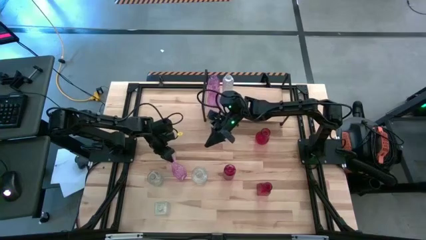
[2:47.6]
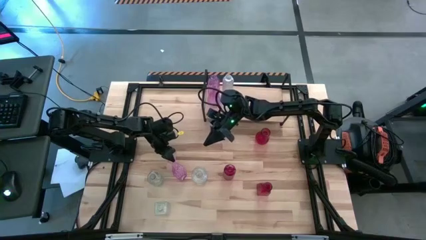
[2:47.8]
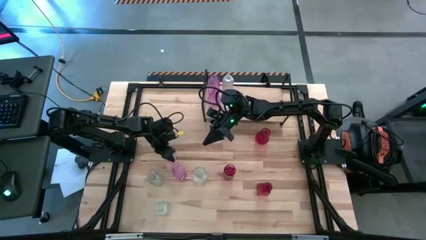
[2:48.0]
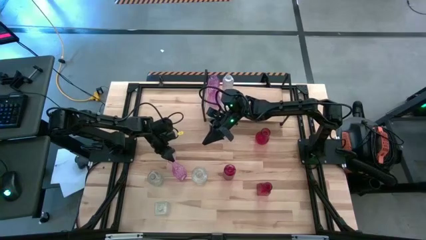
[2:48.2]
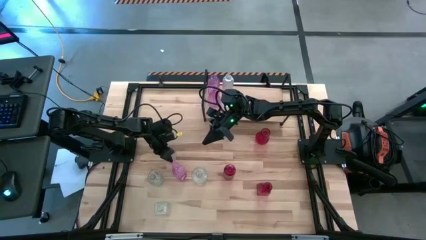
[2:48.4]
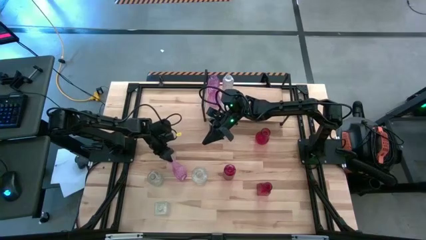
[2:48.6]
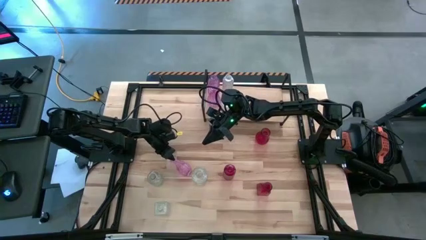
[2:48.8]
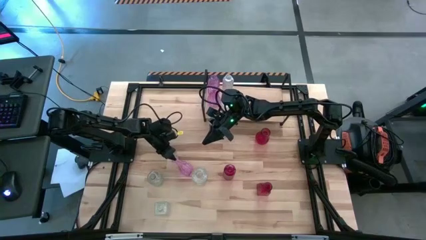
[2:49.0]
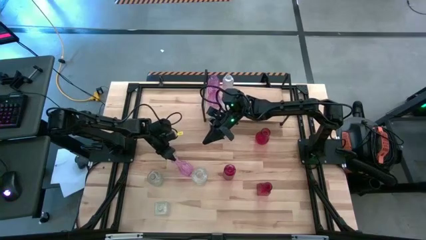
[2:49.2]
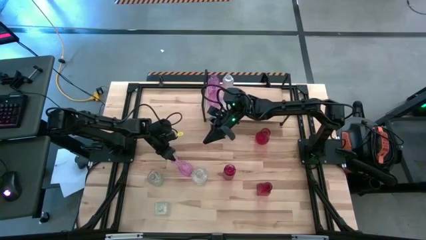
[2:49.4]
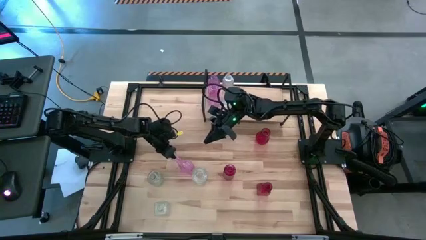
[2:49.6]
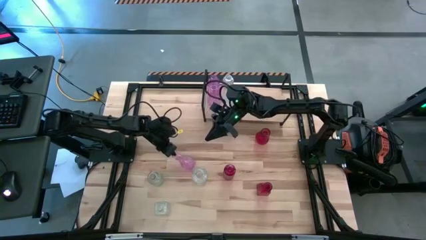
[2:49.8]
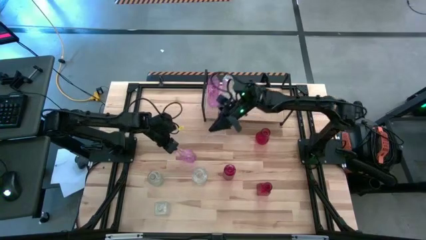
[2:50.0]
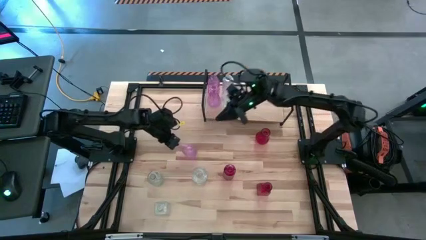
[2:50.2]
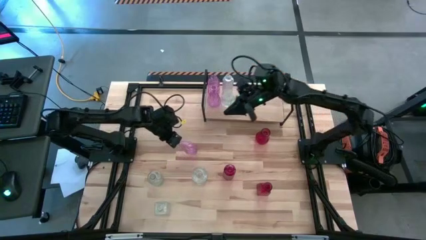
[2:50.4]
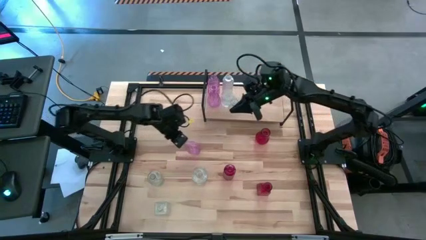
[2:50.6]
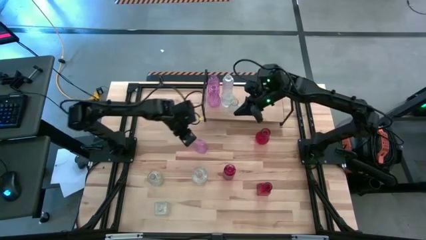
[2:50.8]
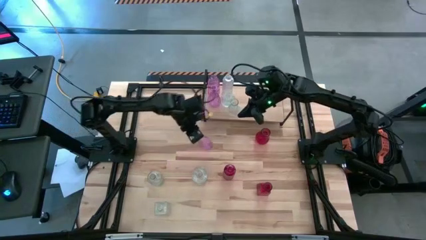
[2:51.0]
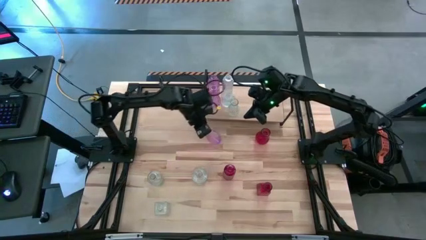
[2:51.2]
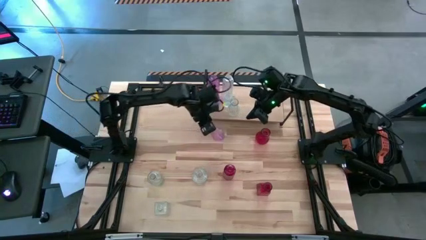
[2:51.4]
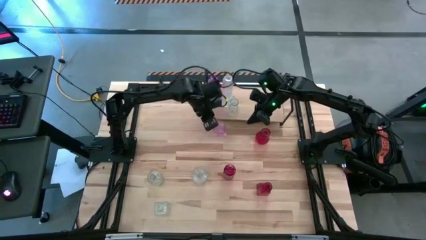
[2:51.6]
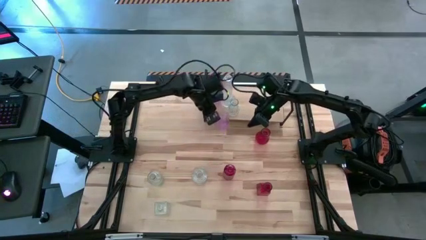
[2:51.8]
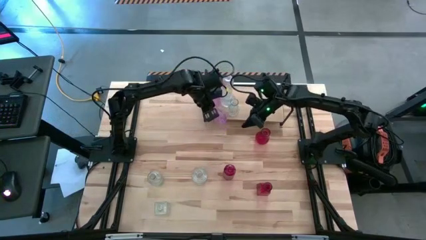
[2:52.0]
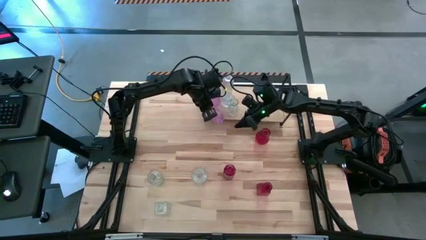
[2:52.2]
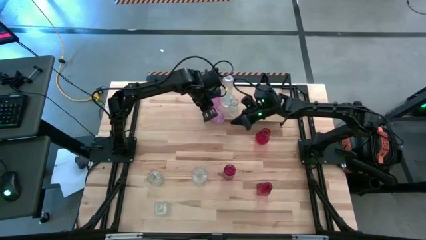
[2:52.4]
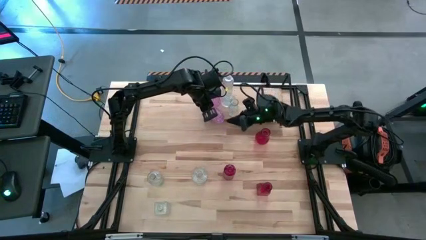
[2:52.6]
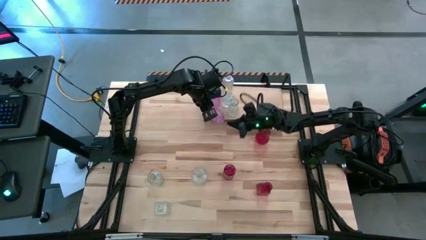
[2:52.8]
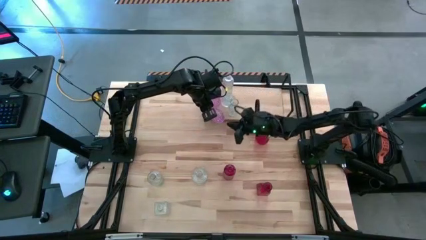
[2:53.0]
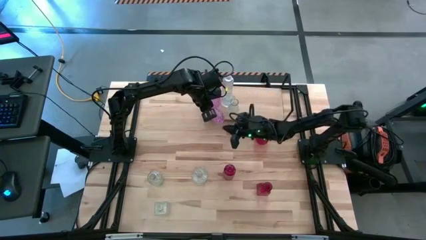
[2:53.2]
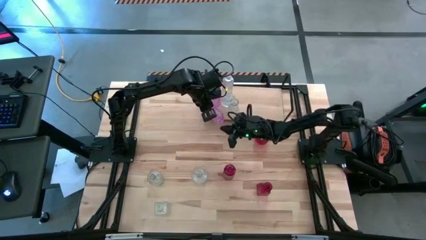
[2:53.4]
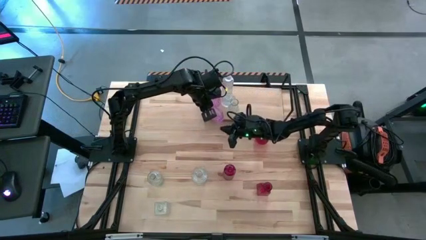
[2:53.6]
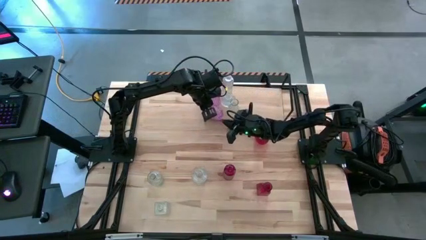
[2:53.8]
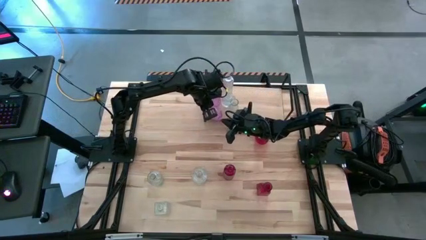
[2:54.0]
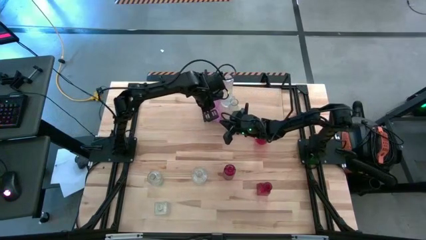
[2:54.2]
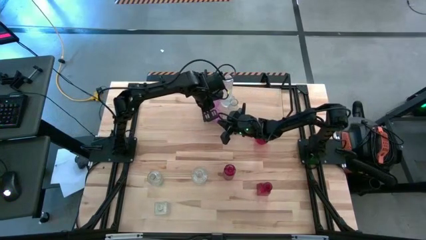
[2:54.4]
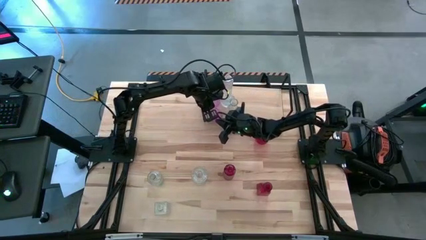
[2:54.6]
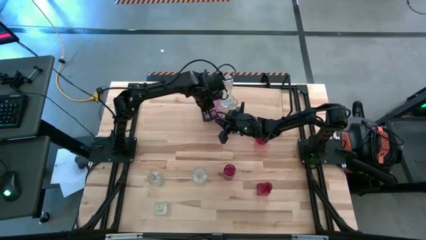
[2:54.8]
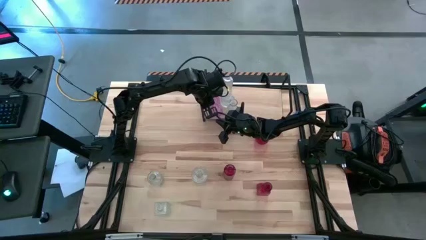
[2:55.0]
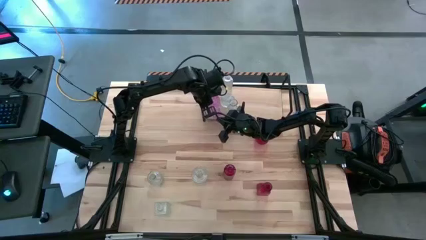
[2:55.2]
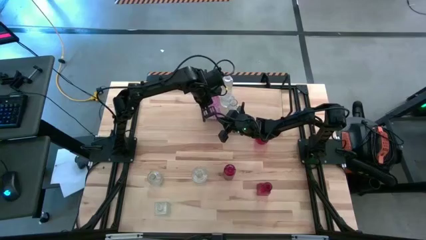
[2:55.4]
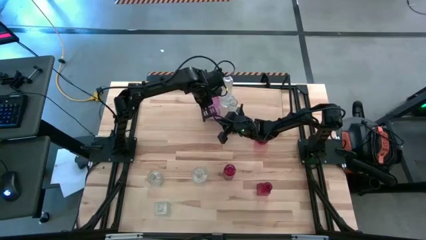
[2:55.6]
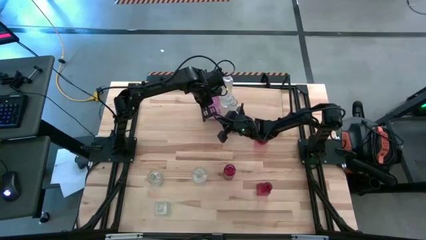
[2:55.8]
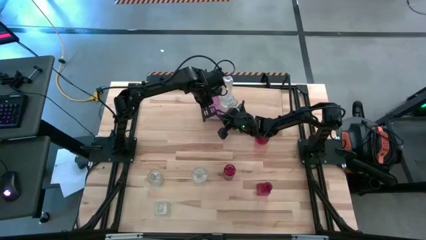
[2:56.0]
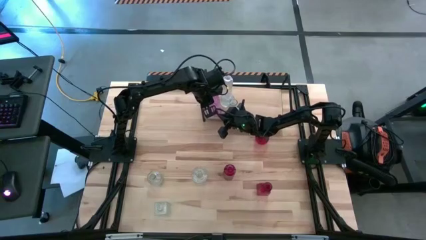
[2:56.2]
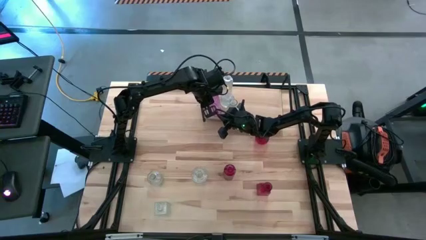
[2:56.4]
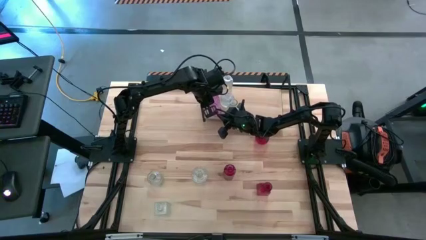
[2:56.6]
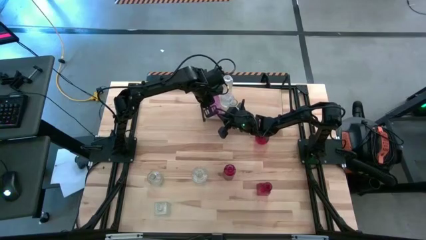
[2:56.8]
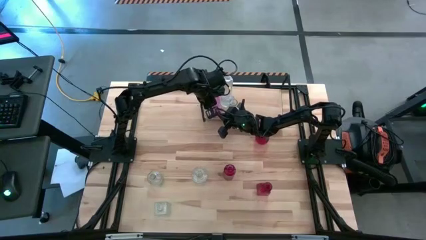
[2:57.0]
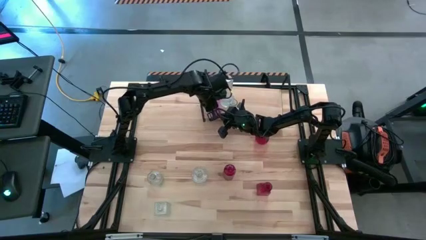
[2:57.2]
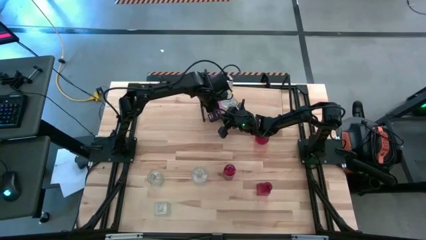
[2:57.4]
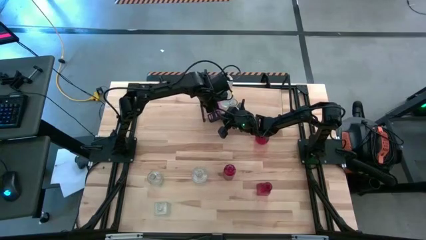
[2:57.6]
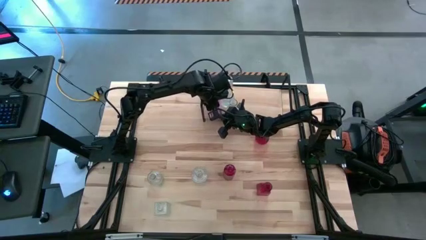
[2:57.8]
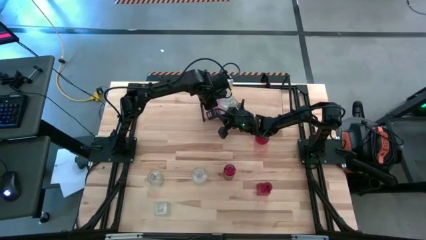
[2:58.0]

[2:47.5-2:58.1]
Task: sort vases onto shelf
Align the violet vase with the other violet vase on the shelf
